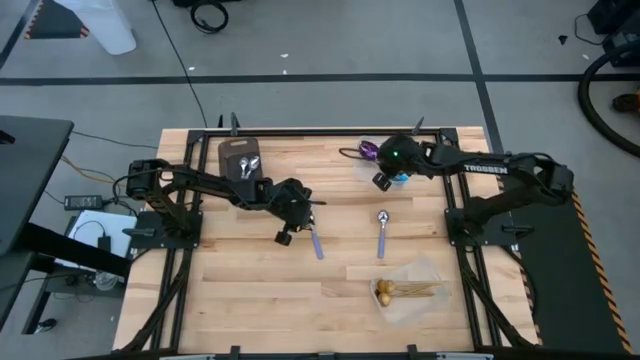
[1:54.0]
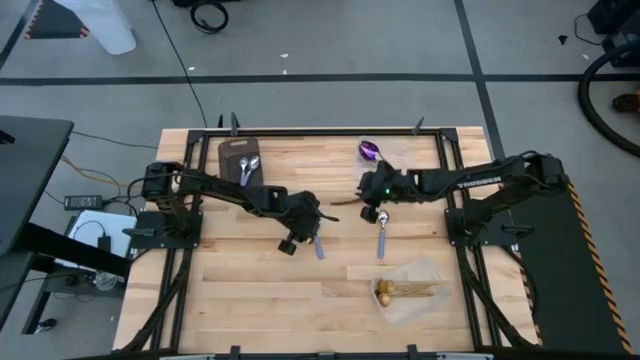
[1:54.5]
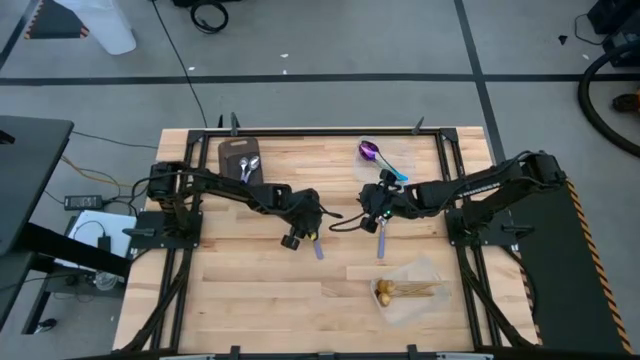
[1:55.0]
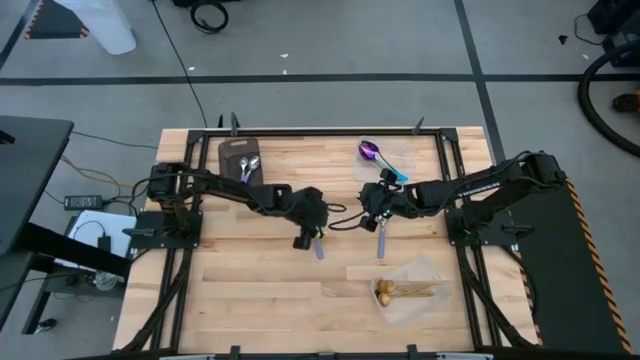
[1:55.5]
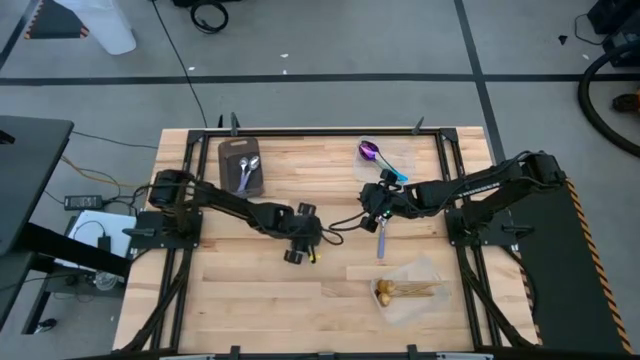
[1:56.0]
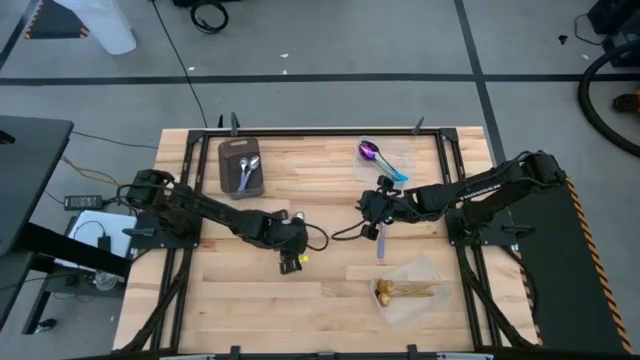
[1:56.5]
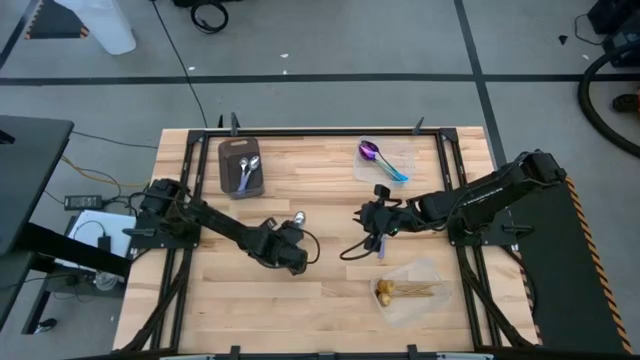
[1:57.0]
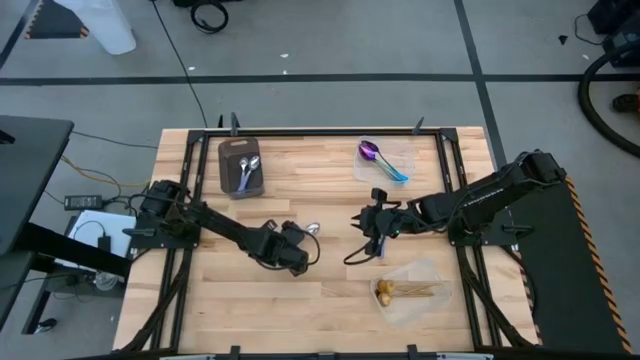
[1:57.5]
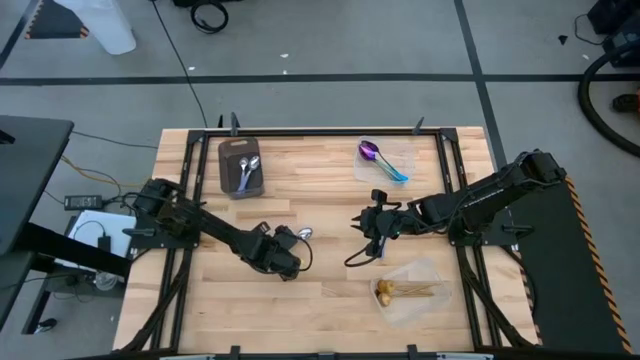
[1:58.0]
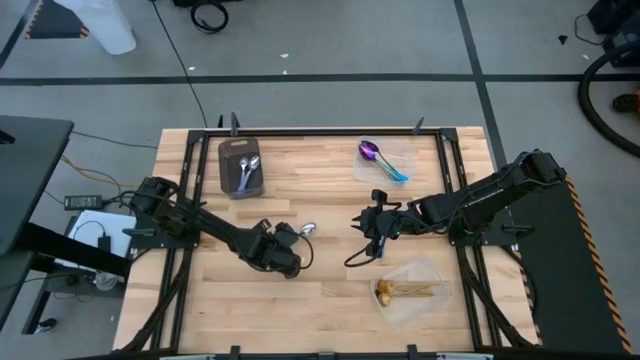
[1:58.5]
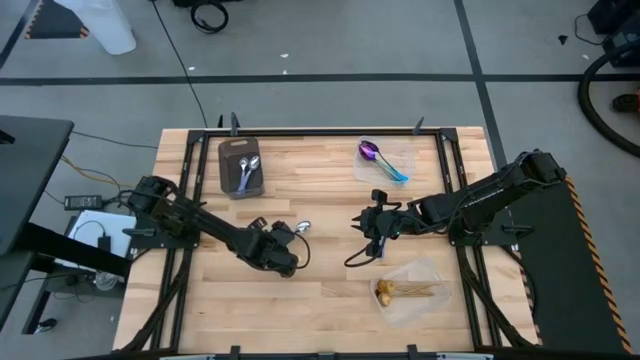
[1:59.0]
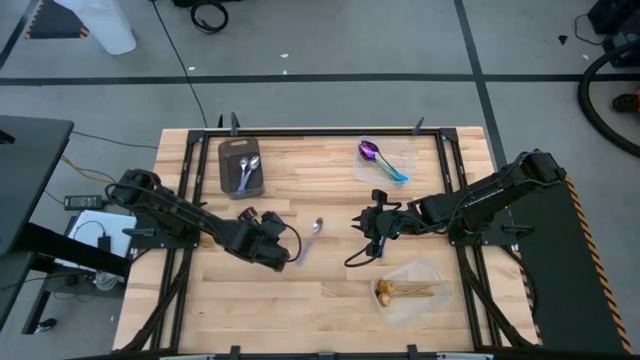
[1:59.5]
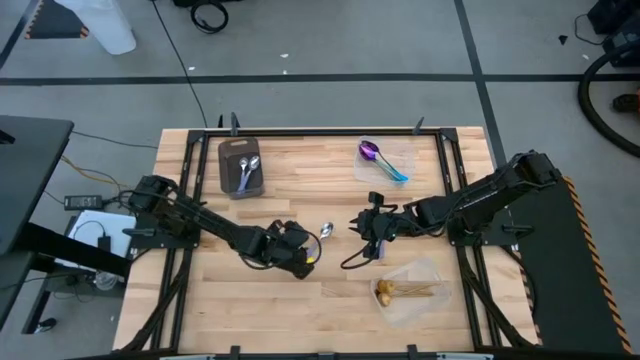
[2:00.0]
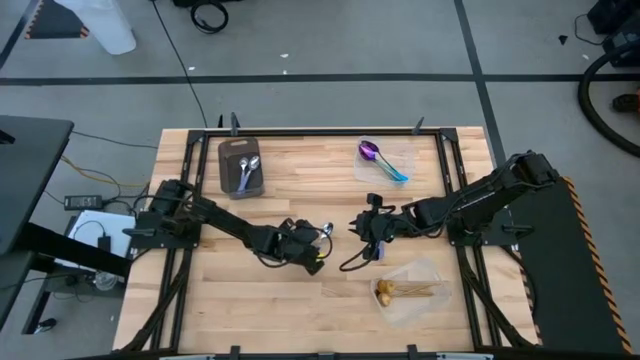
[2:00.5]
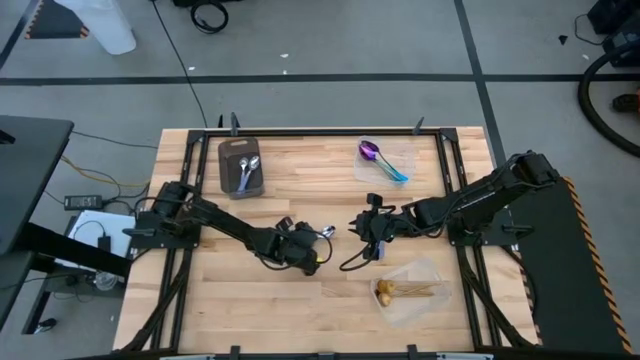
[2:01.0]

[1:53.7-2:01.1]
Task: Sort silverware by color (type)
Put the purple spoon into the black bin

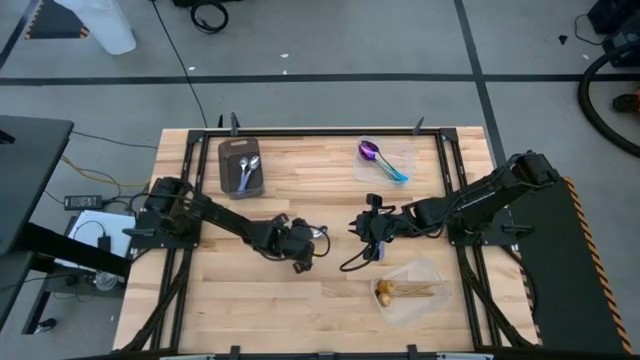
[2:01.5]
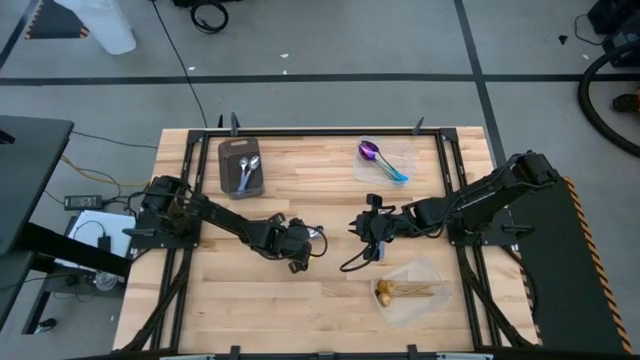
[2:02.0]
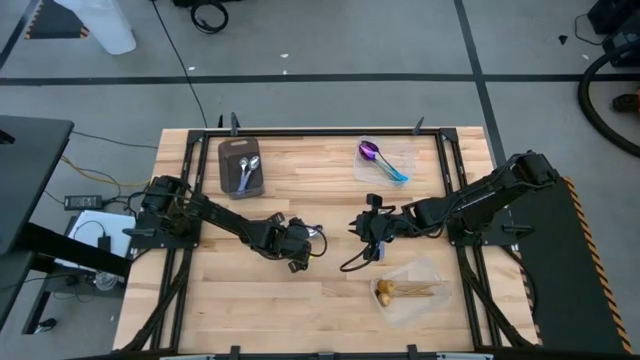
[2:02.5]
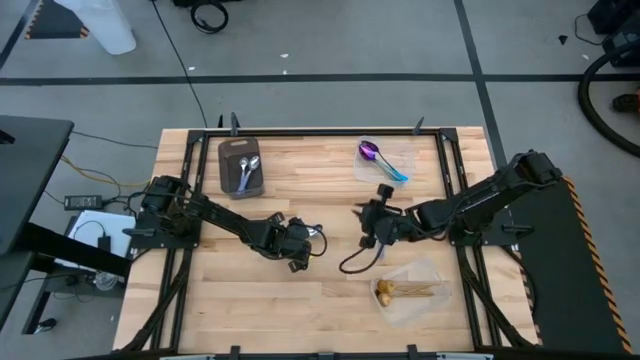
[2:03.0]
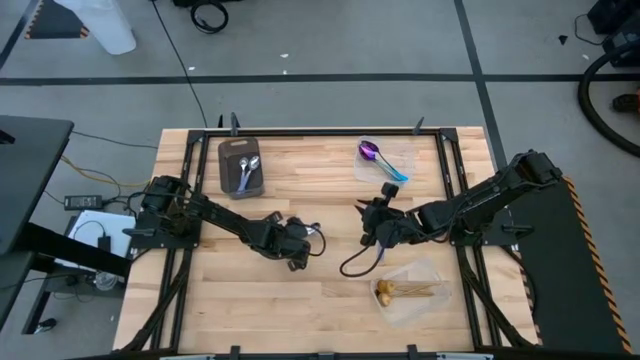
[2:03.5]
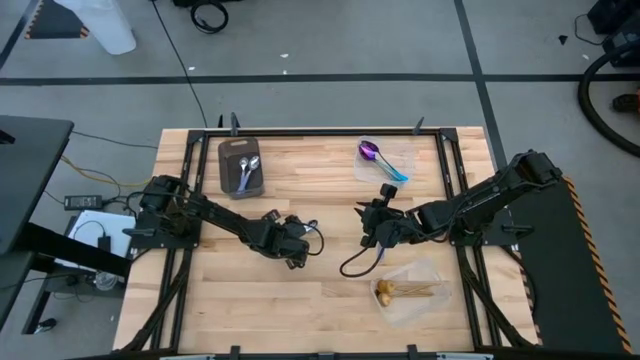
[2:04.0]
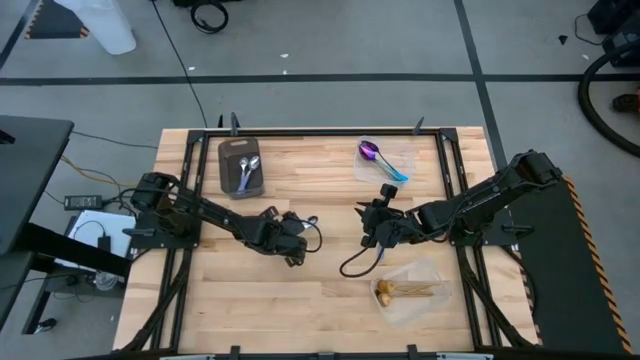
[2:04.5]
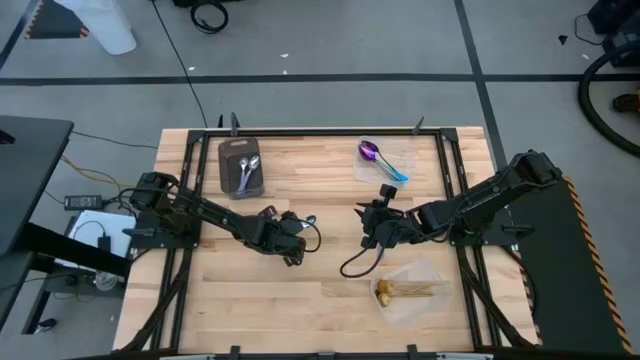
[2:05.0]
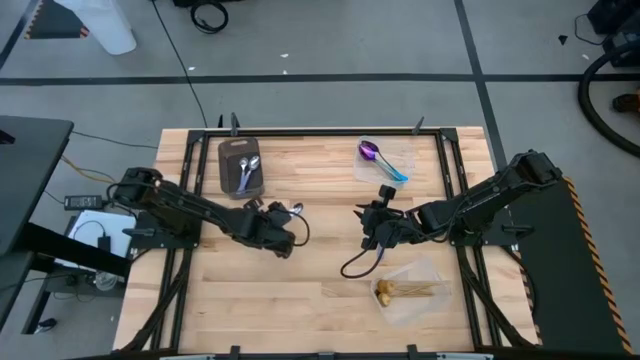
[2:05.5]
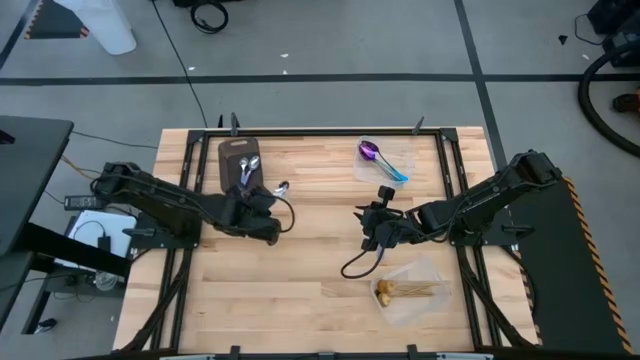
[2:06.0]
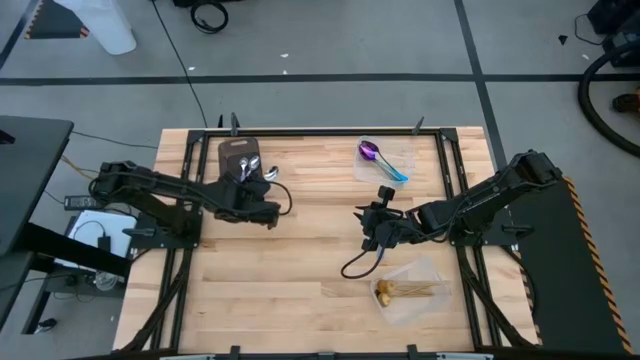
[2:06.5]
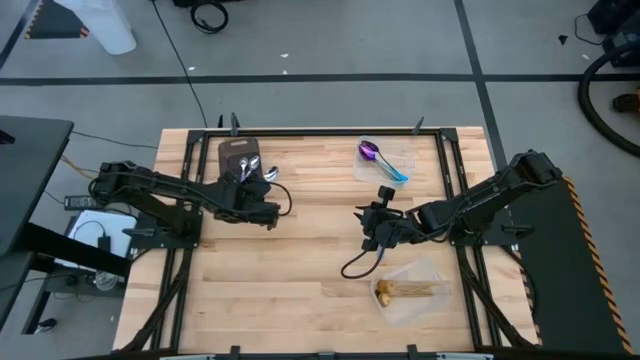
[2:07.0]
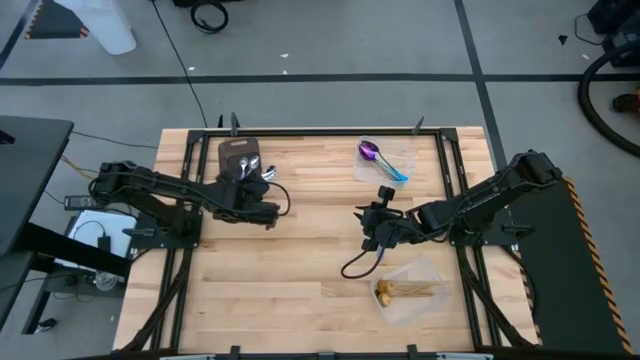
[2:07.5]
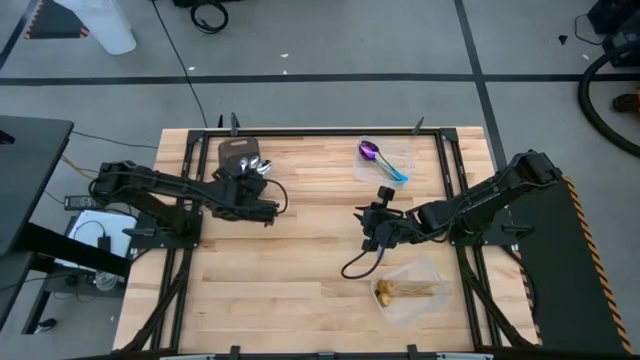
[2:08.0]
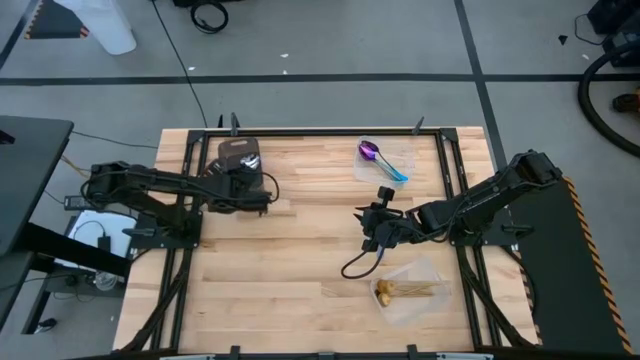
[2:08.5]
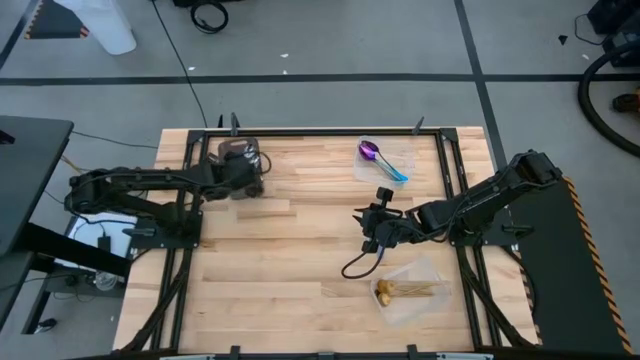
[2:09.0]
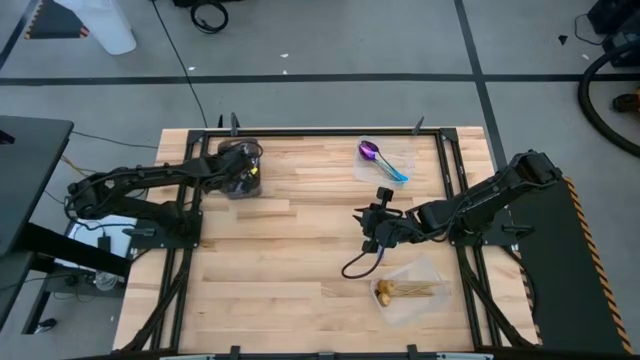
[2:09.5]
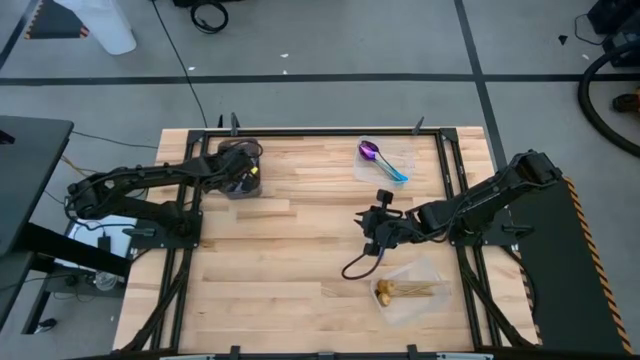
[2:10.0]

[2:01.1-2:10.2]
Put the purple spoon into the black bin

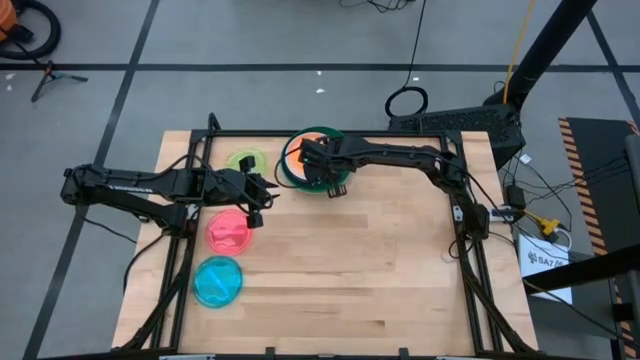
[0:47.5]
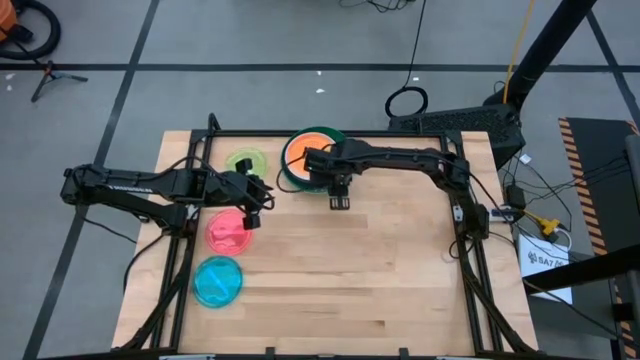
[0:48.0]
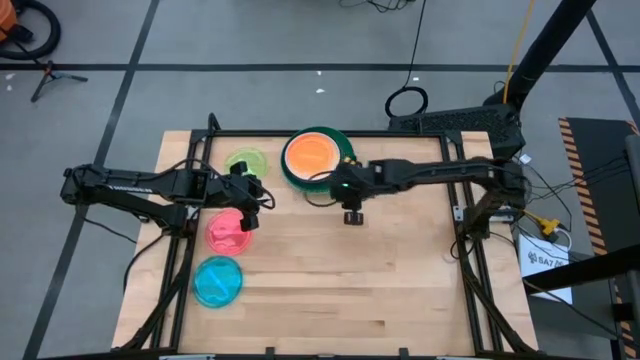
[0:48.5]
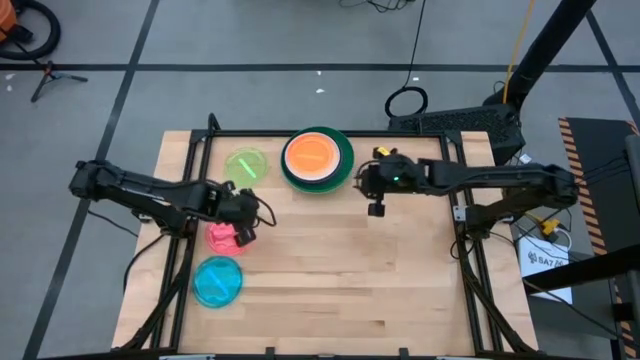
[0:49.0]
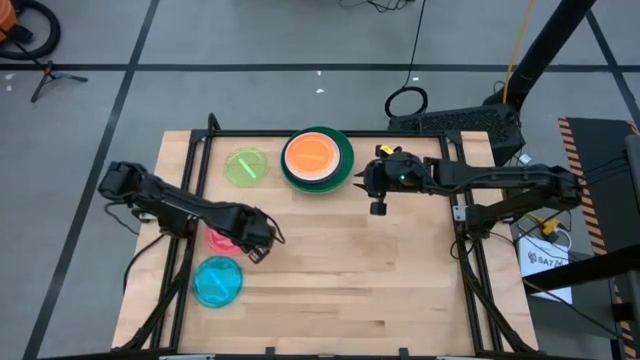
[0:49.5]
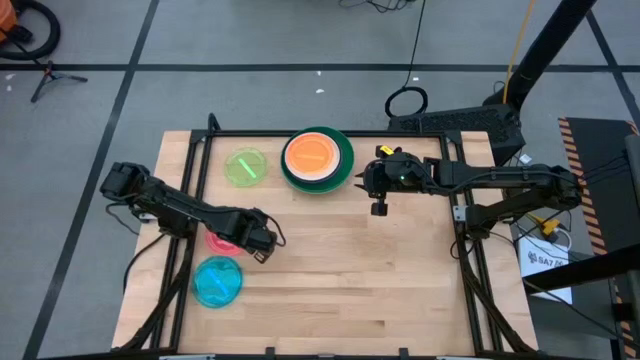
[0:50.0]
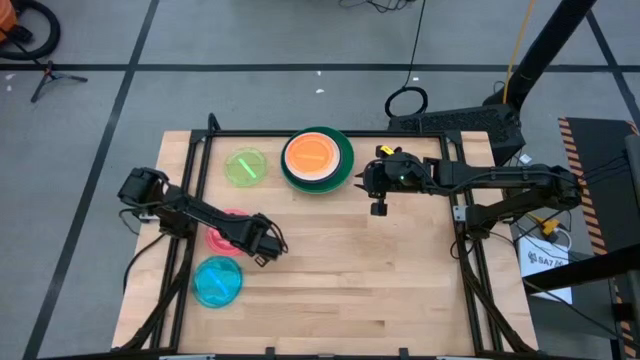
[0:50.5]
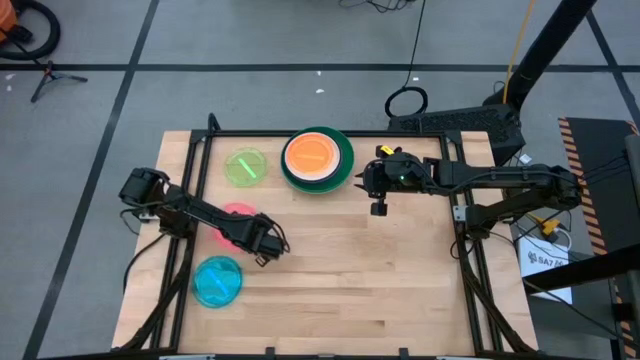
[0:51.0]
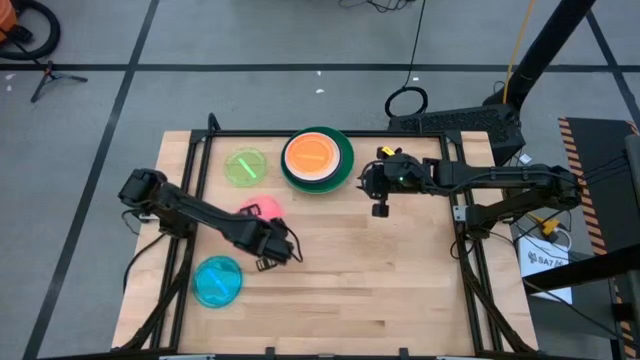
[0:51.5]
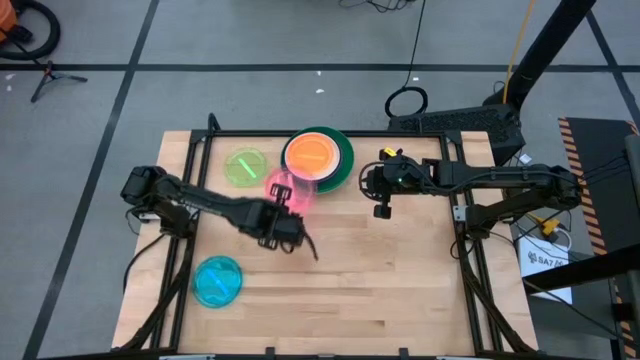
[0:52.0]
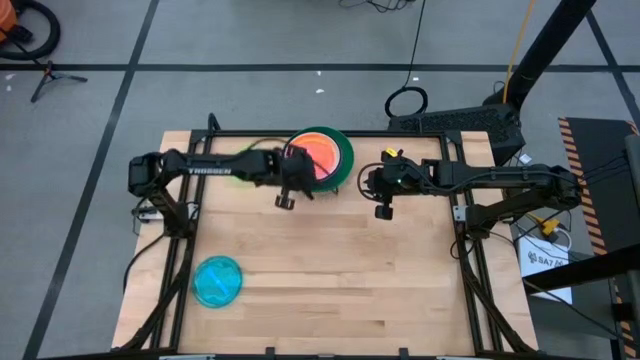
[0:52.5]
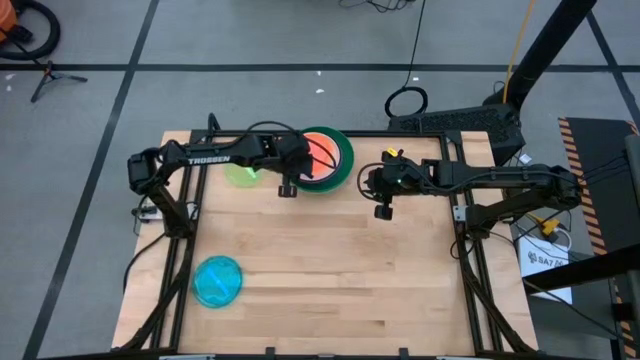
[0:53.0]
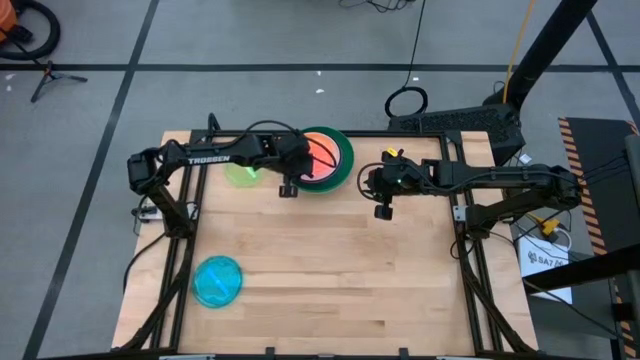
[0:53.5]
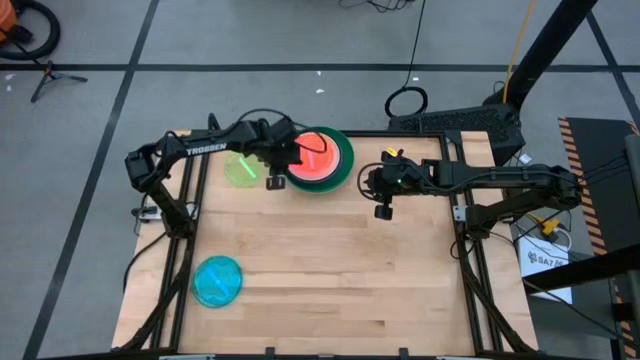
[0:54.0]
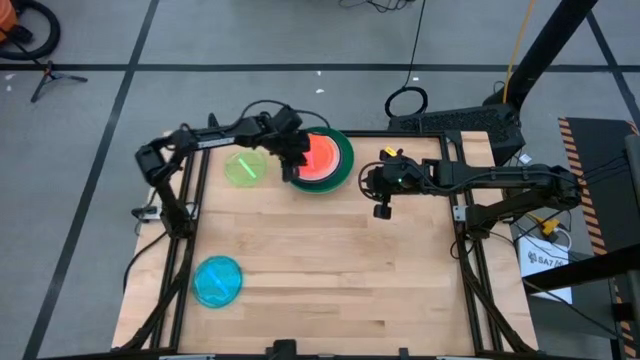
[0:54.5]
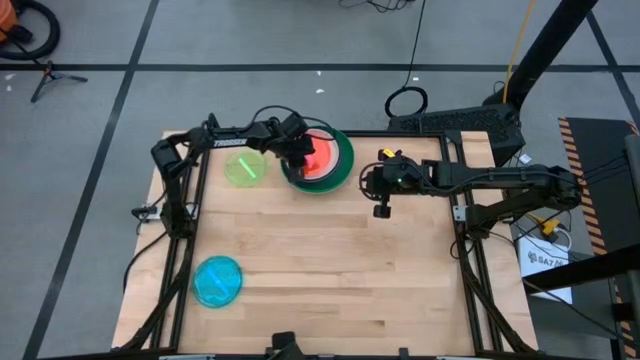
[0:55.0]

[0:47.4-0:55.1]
Task: Stack plastic plates
Stack the light pink plate on top of the light orange plate
